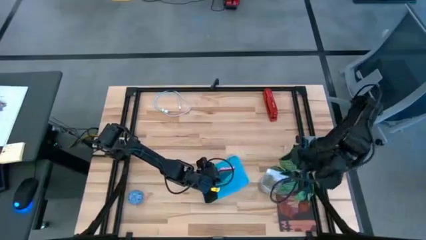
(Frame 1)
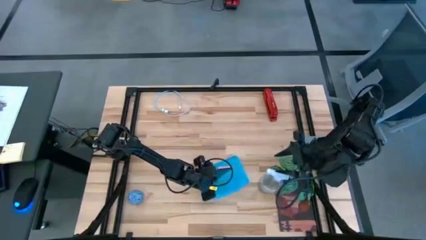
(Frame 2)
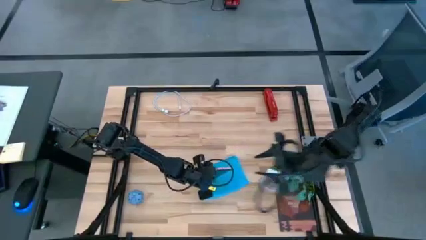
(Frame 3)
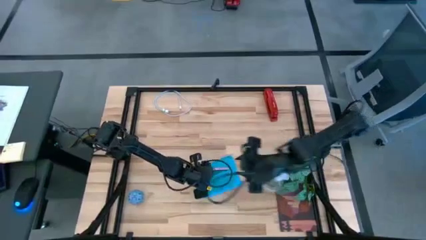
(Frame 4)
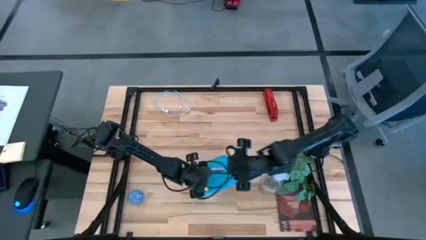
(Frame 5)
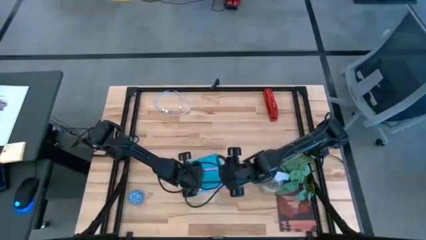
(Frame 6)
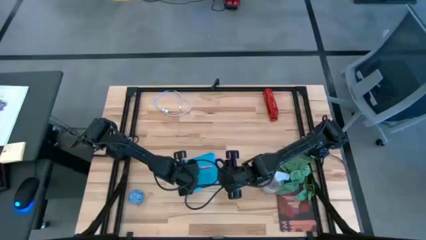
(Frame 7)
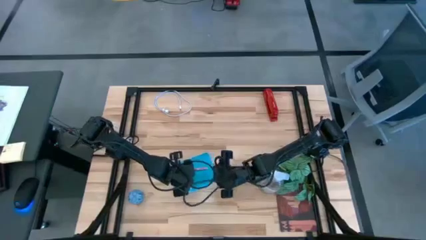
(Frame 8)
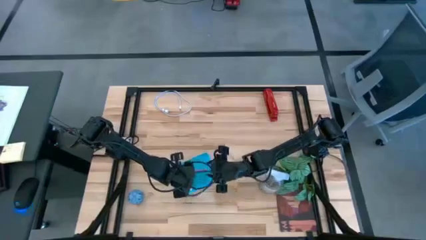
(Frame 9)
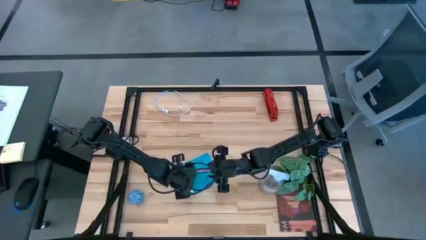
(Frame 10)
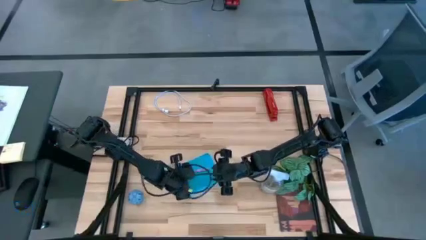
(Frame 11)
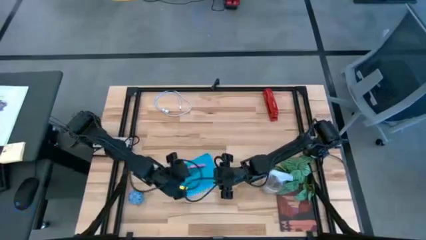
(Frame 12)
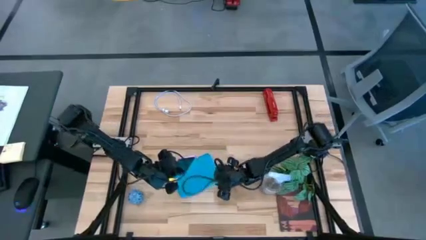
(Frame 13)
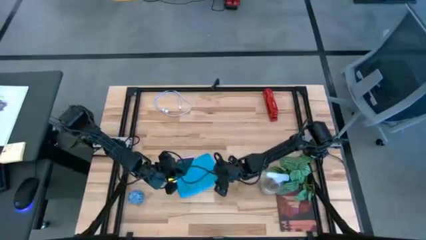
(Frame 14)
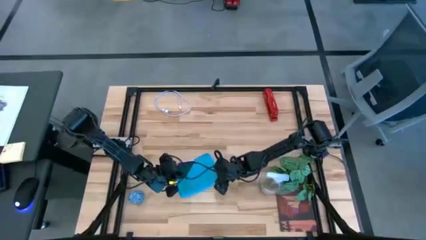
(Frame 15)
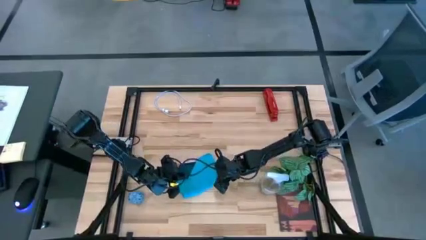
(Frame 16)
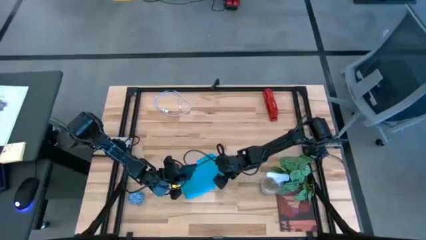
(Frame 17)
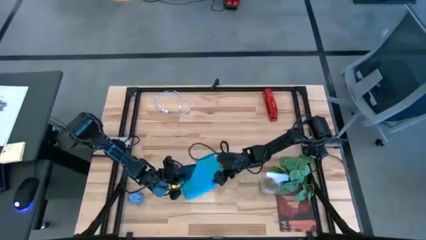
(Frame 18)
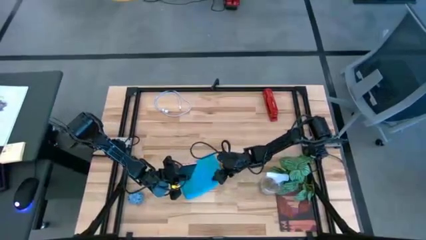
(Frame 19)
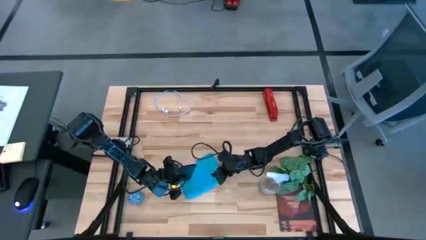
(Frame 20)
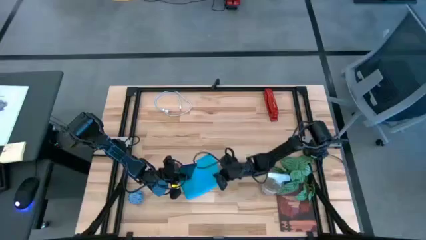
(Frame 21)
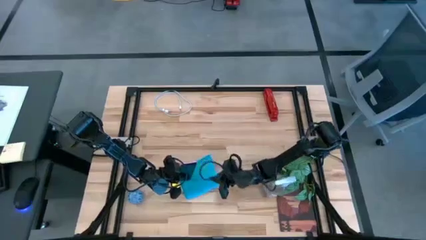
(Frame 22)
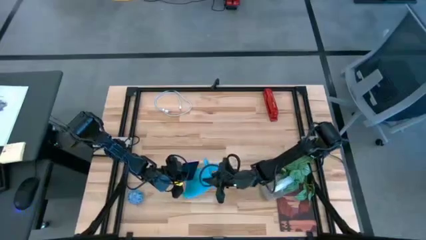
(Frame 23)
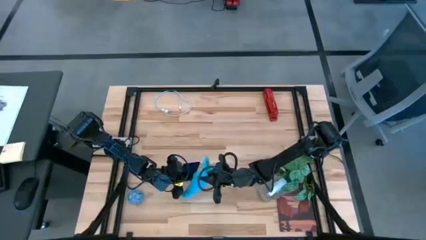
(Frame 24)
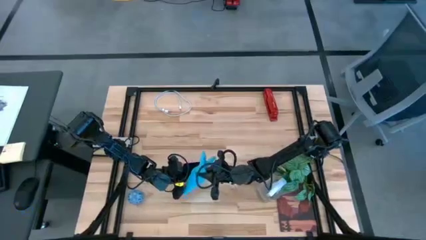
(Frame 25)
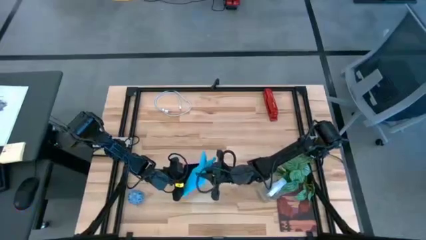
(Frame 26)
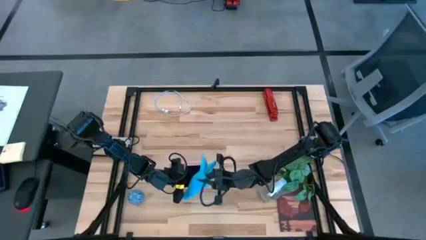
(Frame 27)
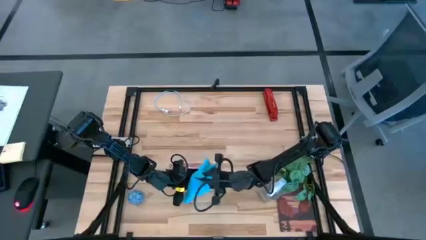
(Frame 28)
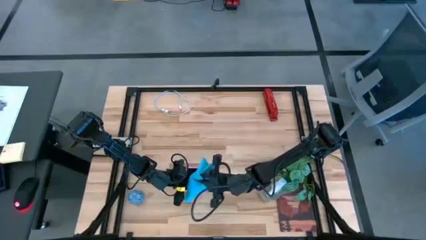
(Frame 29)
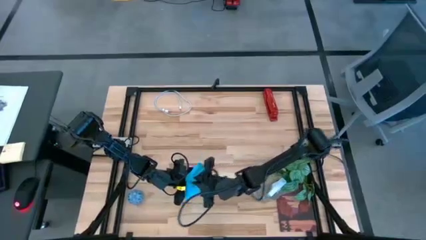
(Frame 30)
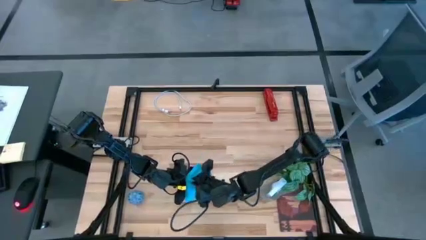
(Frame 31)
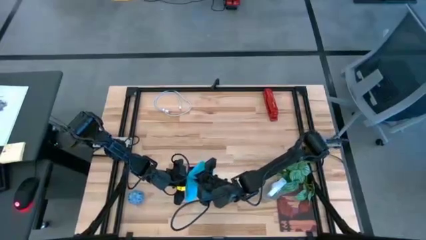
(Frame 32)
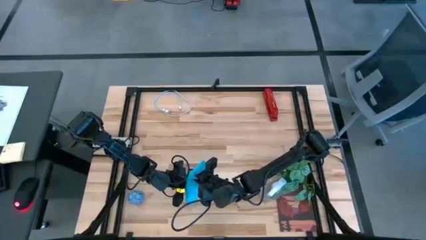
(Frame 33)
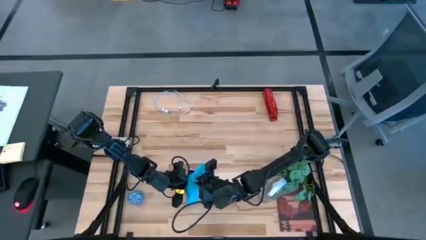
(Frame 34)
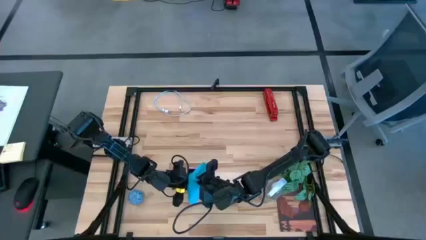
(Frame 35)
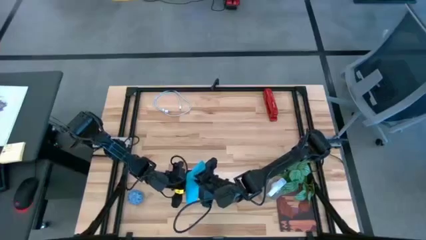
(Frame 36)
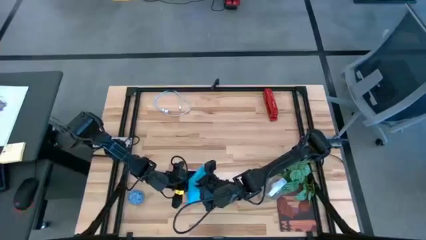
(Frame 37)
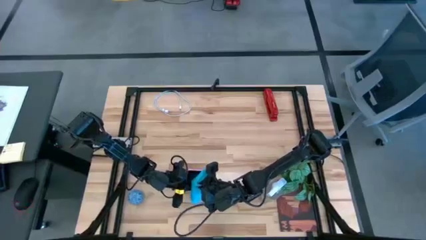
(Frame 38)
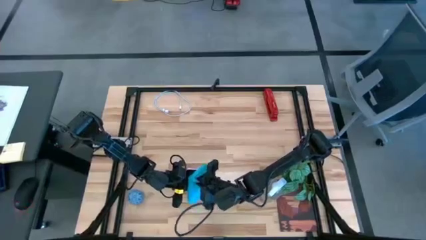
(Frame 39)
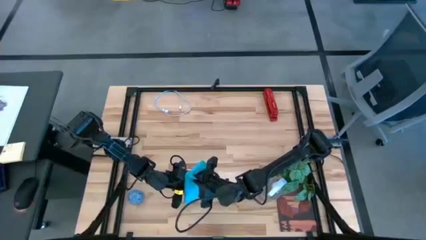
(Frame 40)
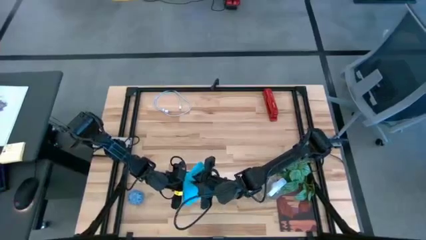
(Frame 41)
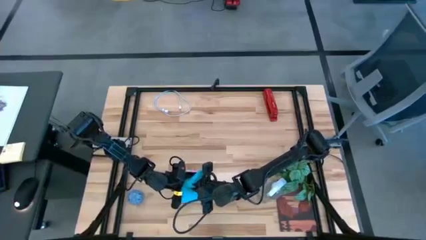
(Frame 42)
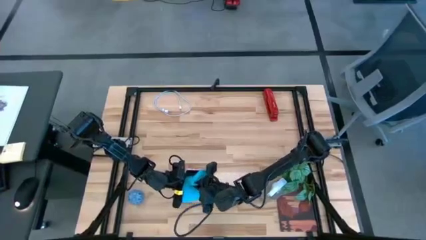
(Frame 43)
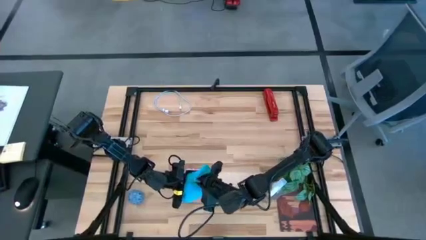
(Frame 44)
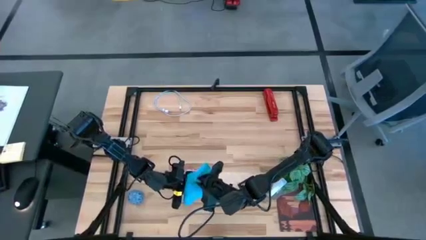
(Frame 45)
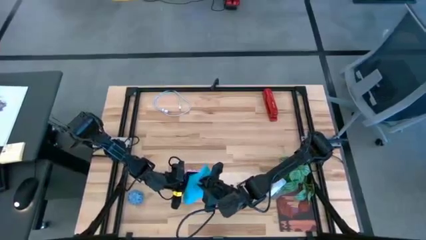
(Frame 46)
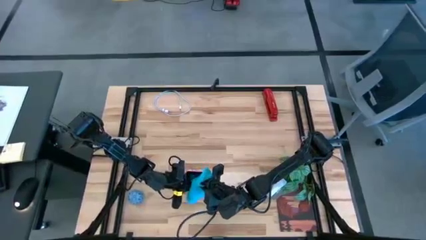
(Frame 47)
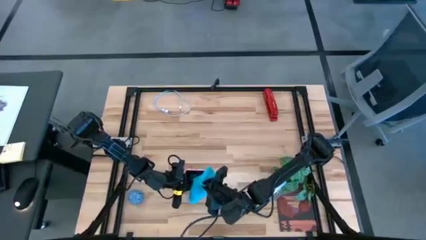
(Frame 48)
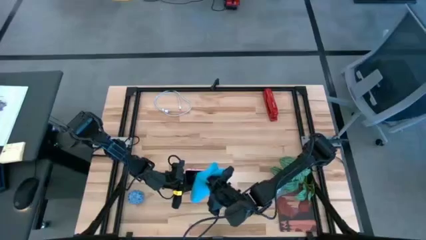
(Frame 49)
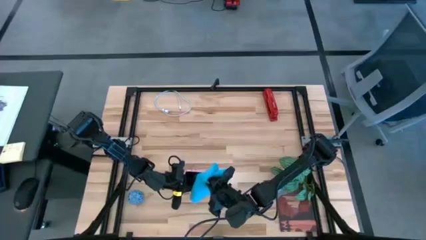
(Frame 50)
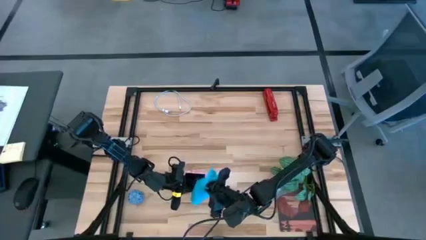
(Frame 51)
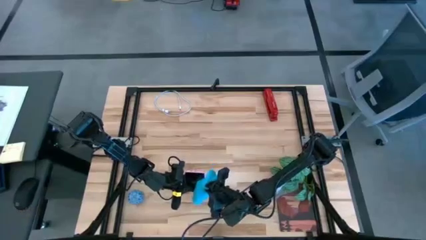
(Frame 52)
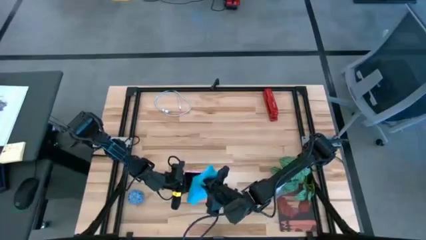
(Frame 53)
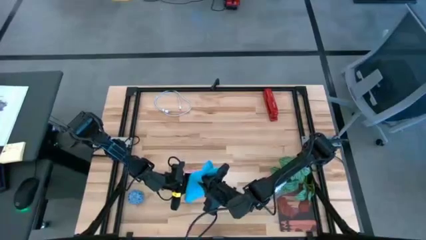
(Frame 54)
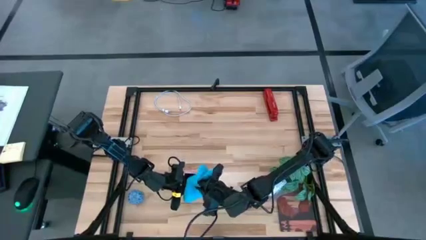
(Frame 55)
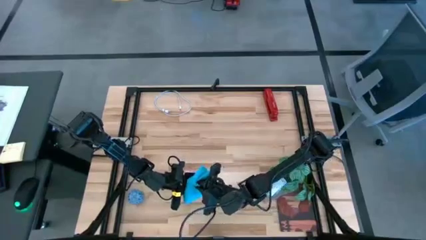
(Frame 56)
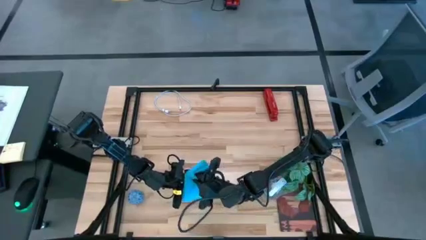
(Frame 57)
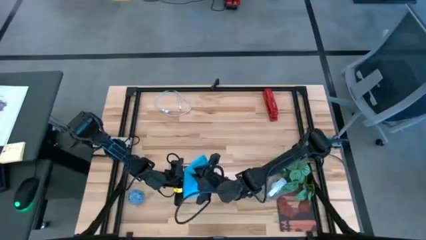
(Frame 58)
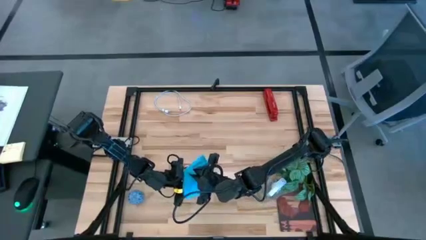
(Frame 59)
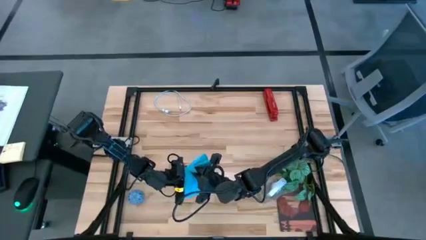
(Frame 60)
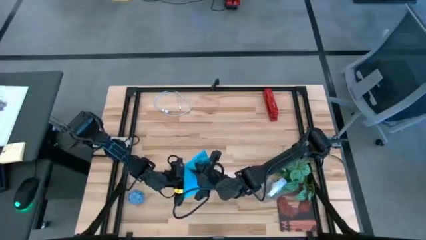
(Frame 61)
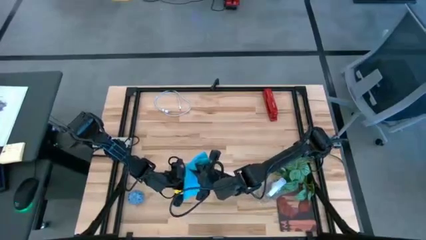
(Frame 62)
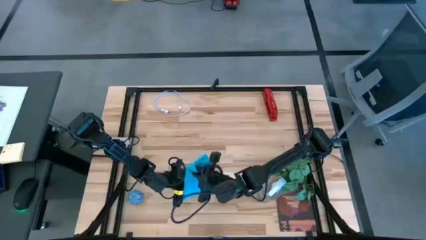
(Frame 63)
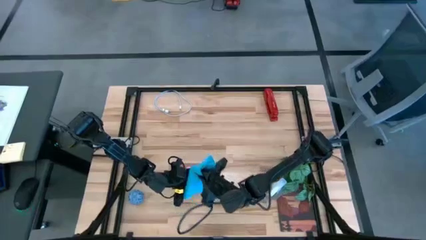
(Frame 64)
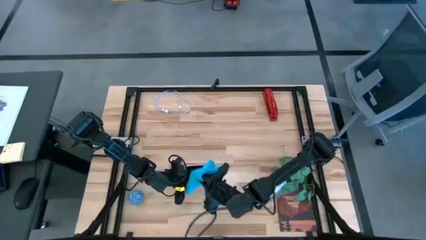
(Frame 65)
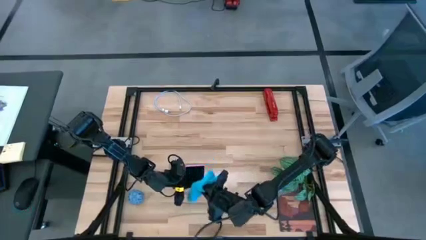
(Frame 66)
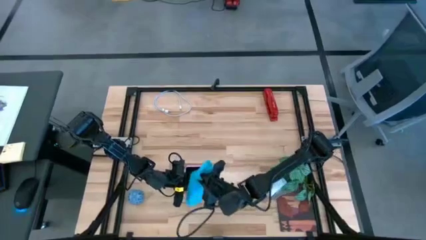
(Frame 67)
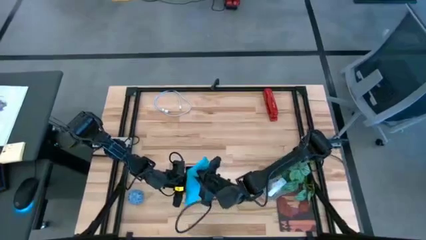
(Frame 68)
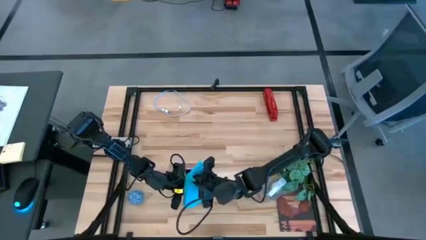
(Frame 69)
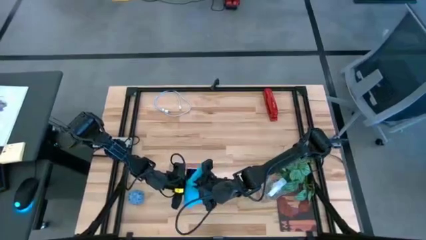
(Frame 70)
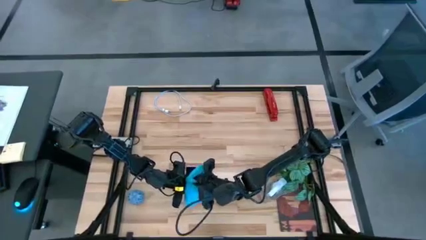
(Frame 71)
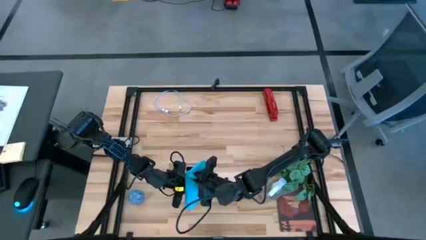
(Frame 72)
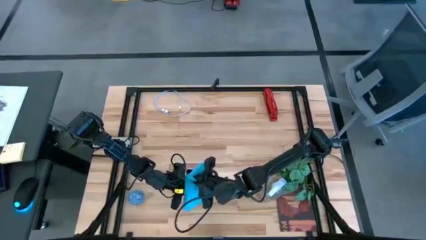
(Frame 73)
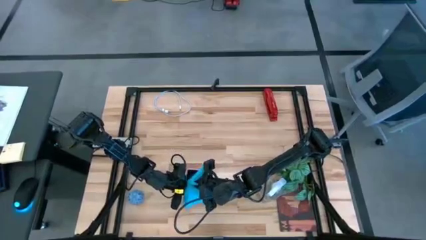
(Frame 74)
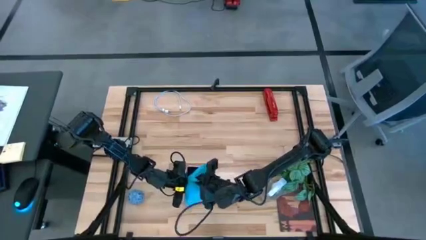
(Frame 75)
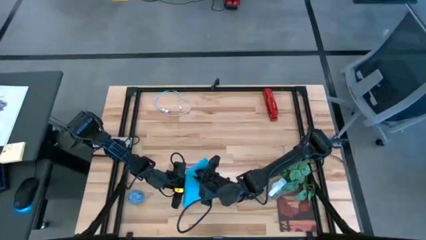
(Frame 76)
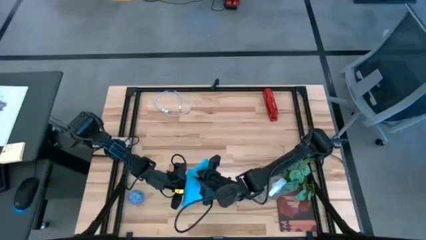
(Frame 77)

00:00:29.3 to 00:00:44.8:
Task: Apply microfiber cloth
Wipe the front of the cellphone with the blue microfiber cloth
